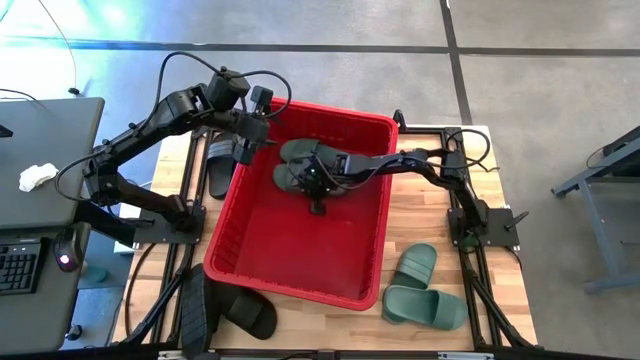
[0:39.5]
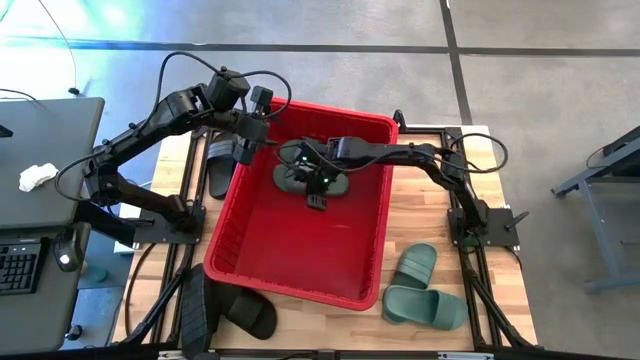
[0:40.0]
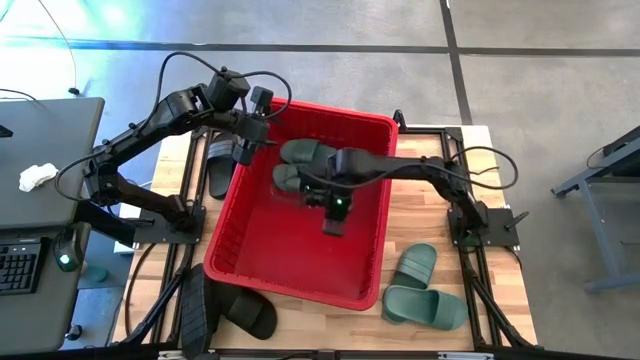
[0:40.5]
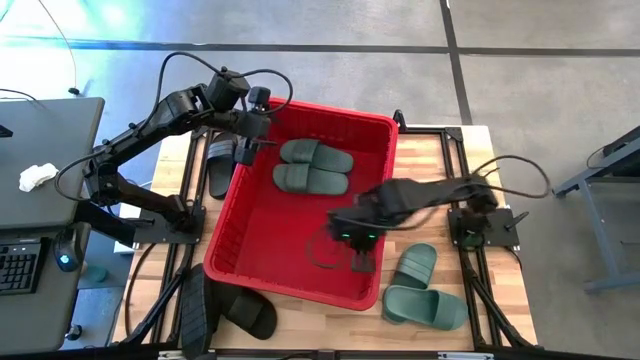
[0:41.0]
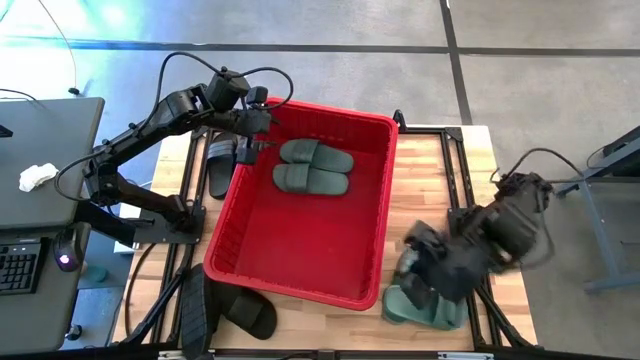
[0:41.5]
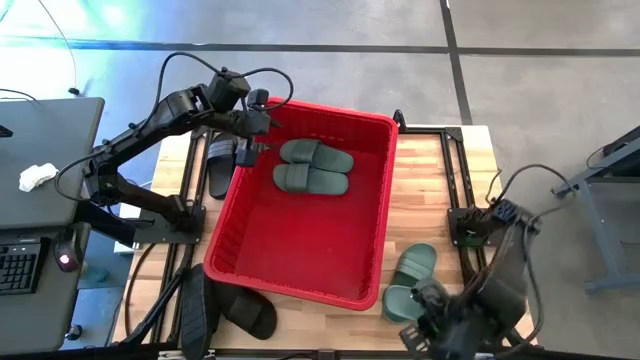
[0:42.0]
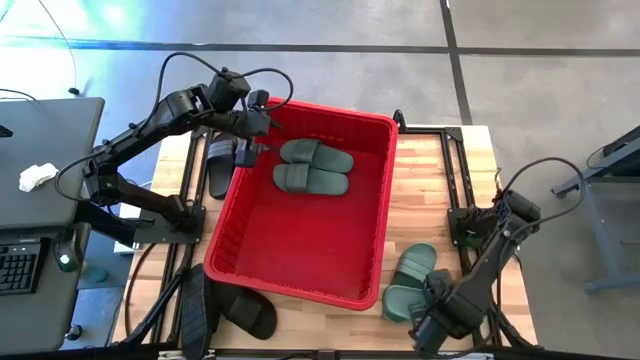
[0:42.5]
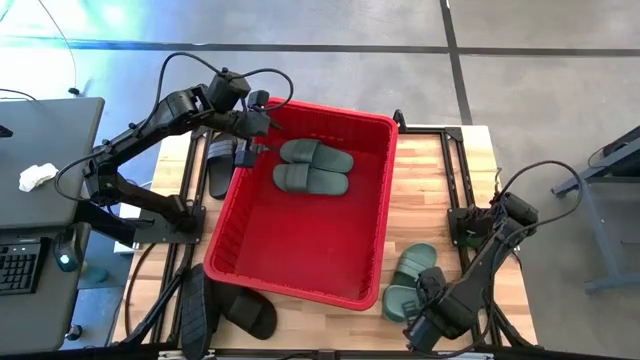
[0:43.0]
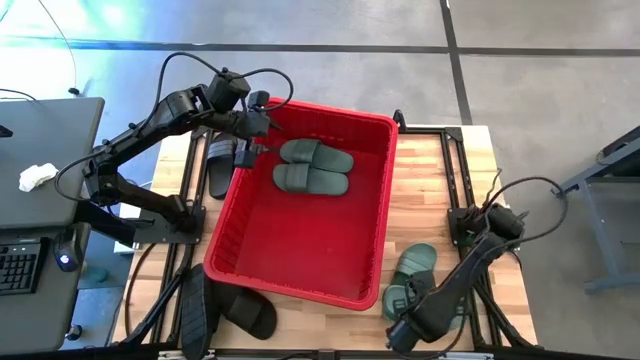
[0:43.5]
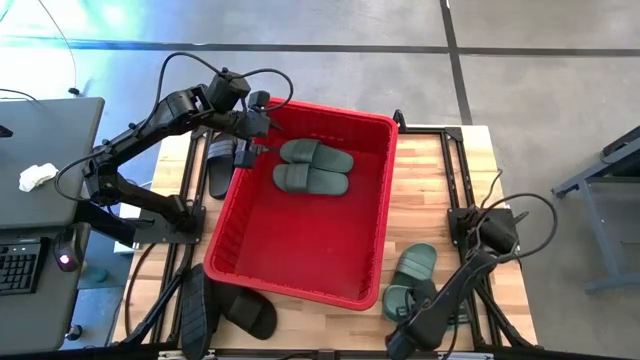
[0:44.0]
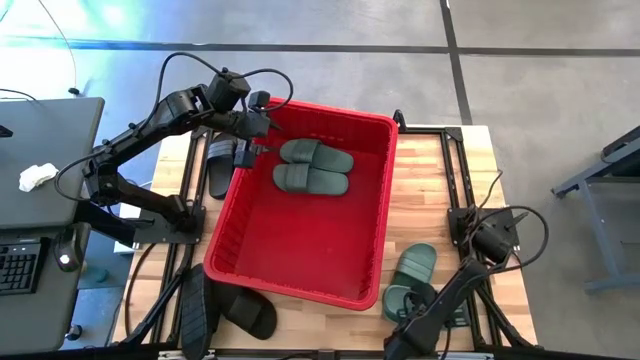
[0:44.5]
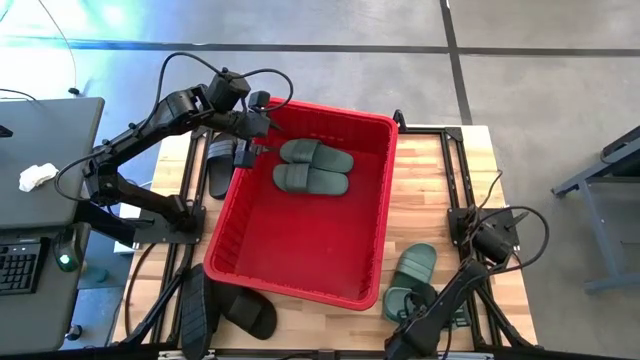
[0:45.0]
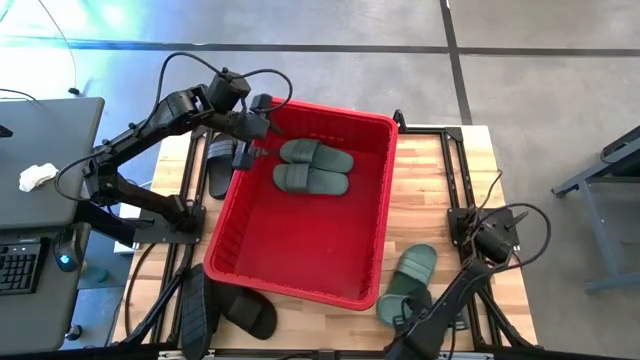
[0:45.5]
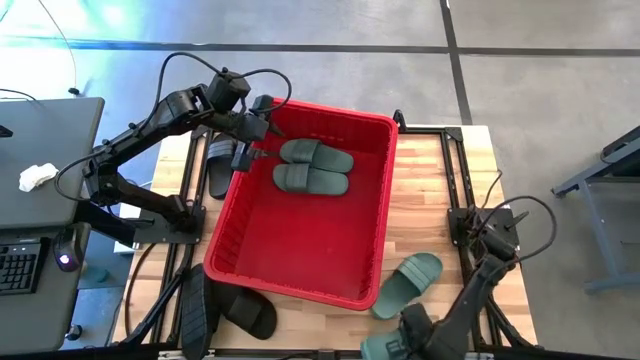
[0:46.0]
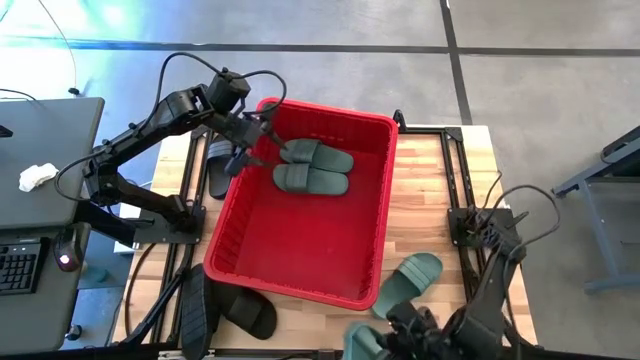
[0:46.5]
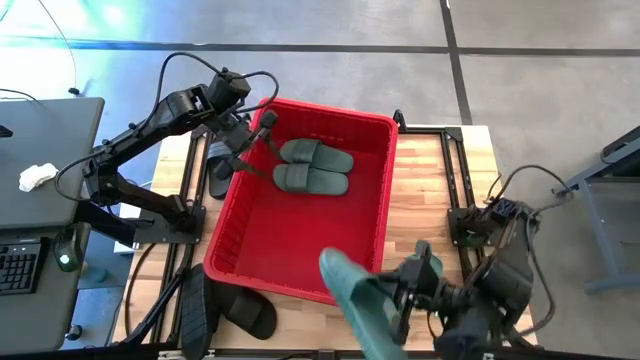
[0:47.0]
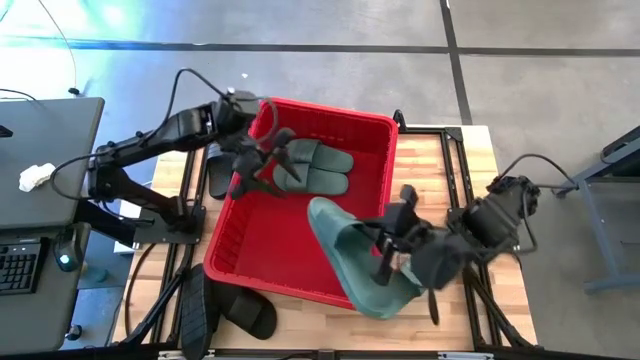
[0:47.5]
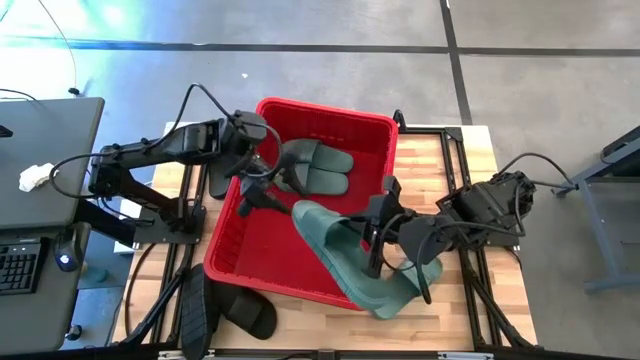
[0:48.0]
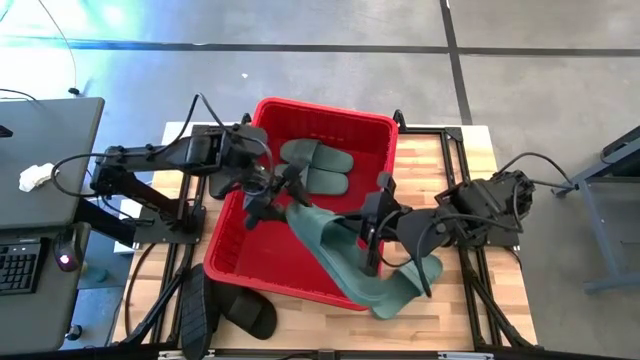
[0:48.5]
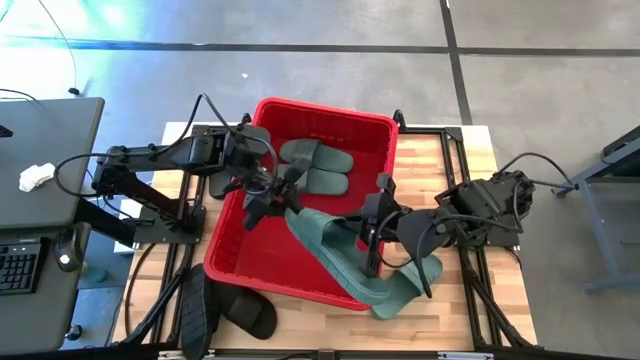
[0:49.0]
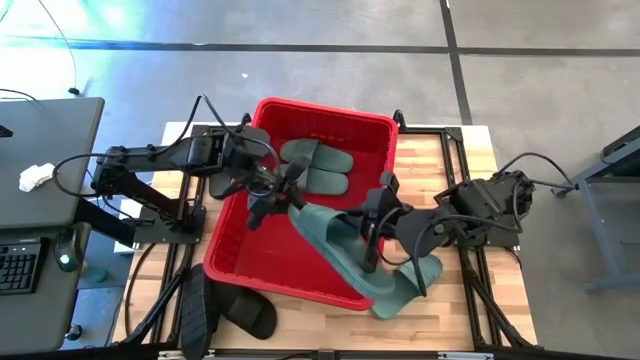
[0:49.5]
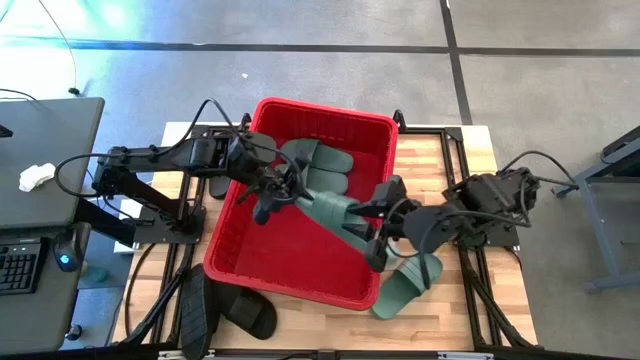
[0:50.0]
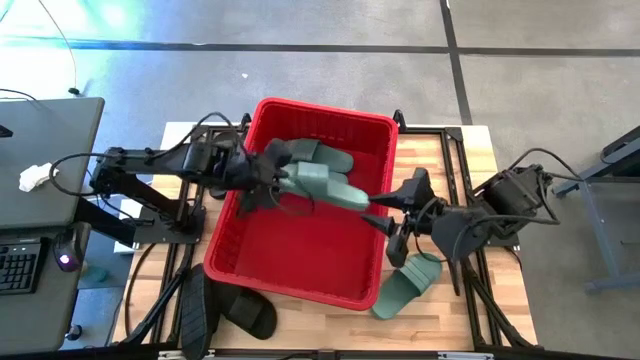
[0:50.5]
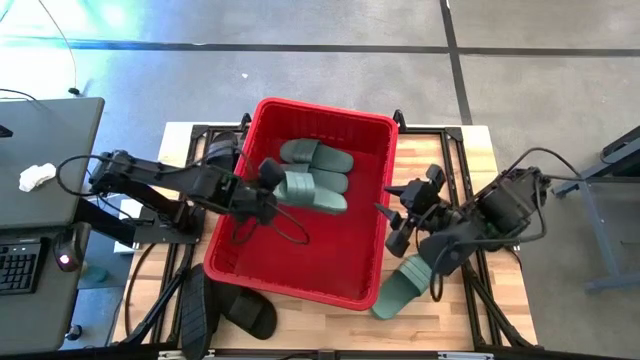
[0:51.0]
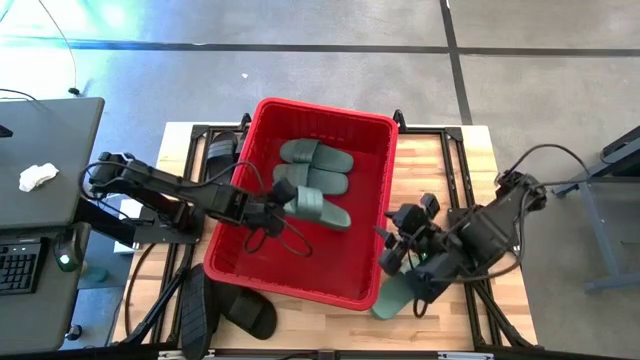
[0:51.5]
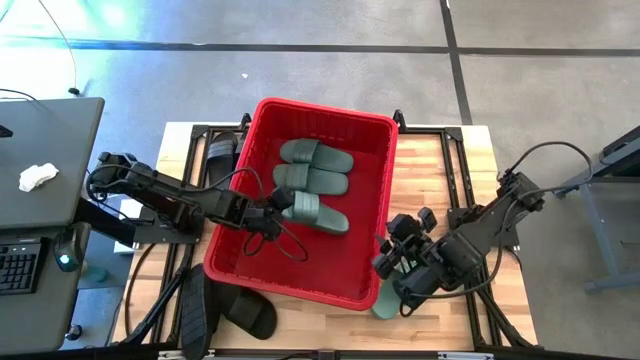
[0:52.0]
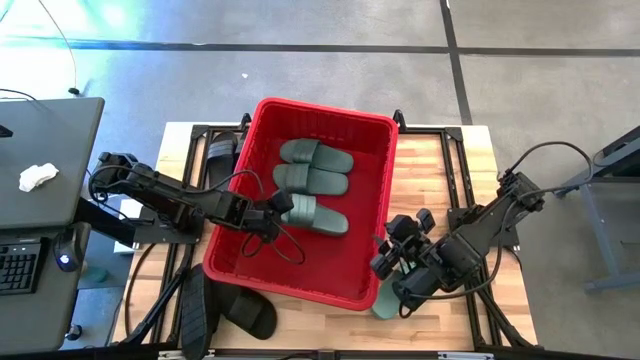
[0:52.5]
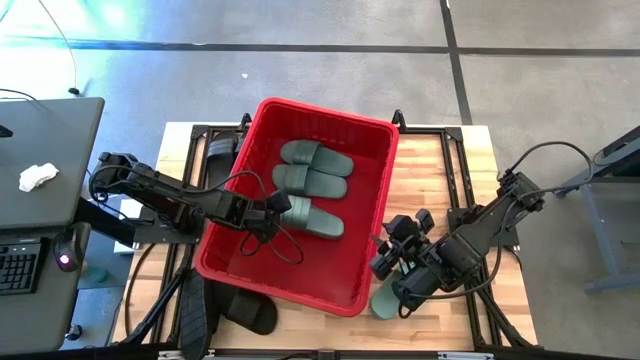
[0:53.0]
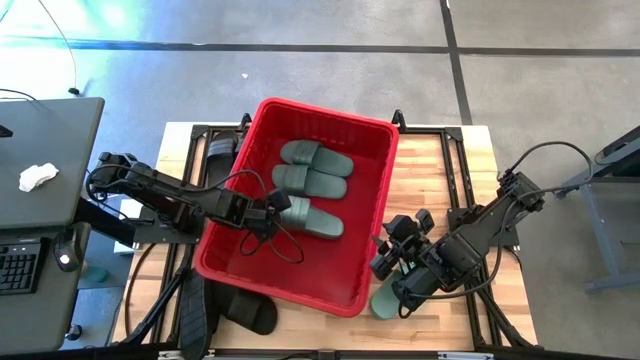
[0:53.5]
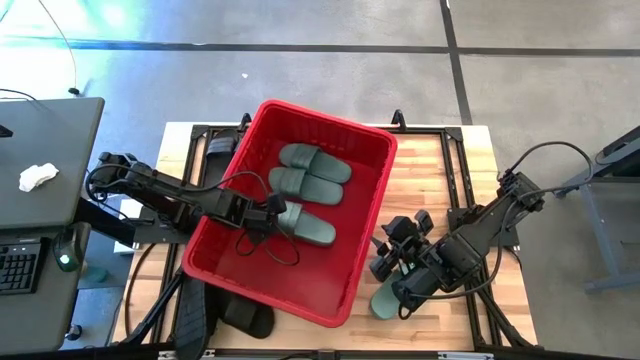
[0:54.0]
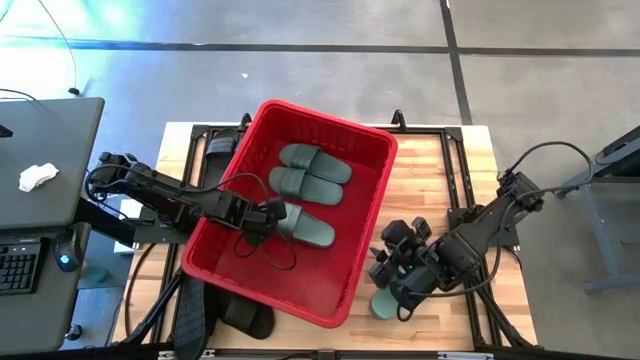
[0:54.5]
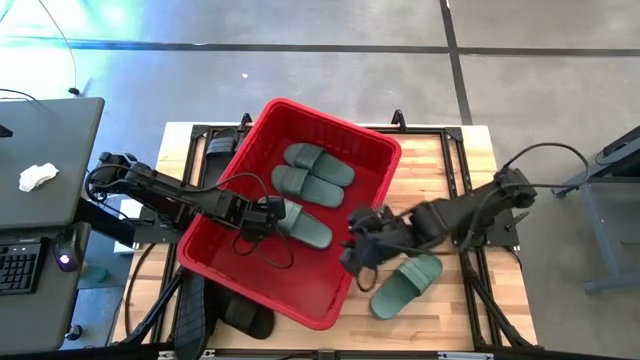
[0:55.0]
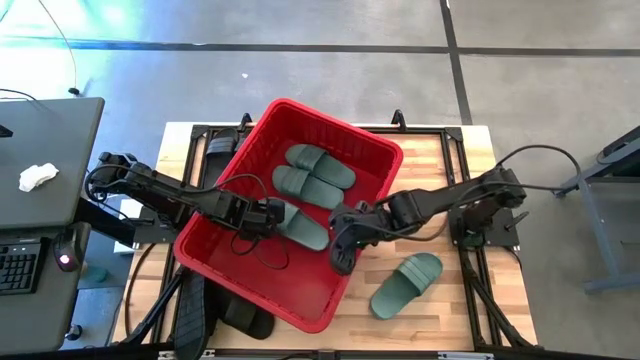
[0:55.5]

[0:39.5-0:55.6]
Task: Pick and place slides into bin
Put the green slide into the red container

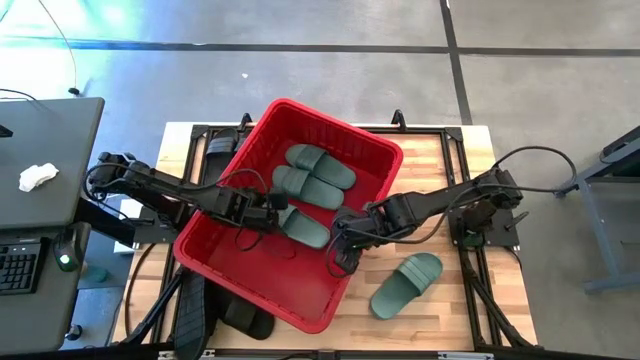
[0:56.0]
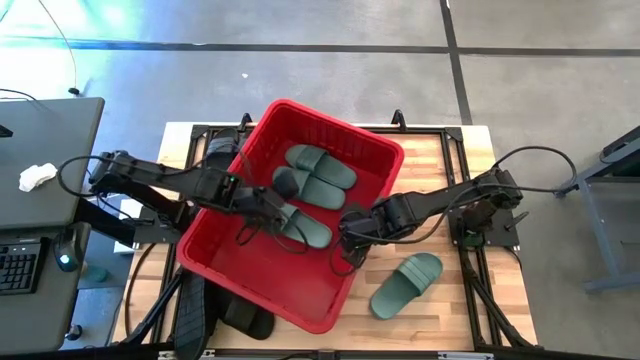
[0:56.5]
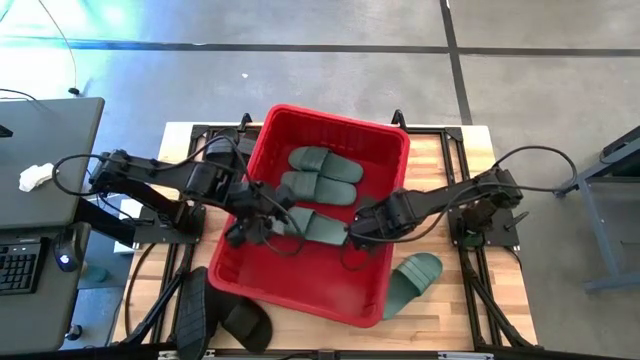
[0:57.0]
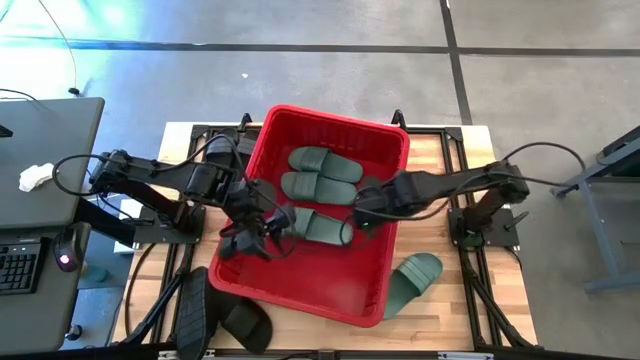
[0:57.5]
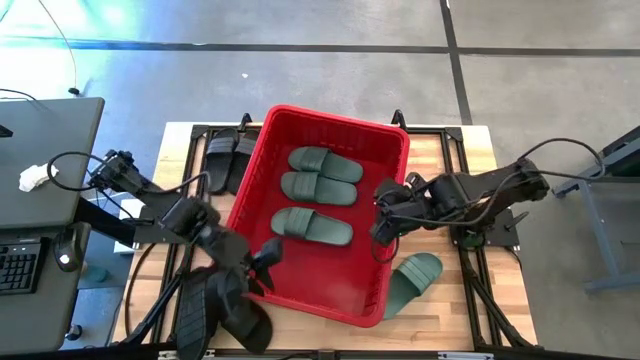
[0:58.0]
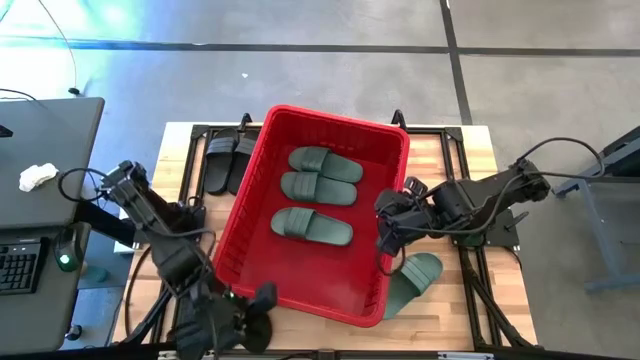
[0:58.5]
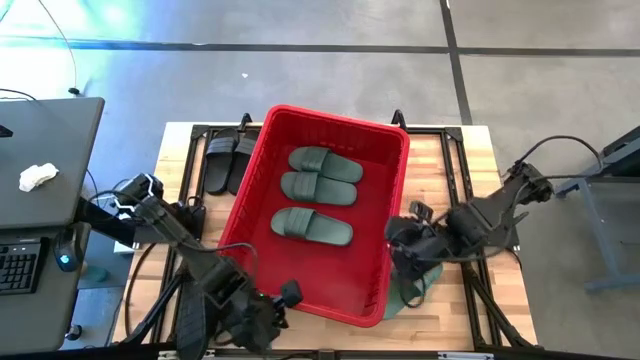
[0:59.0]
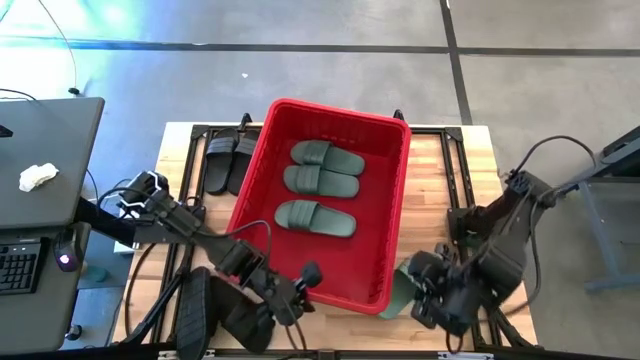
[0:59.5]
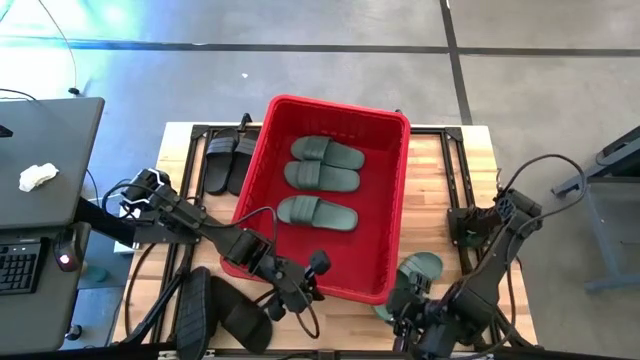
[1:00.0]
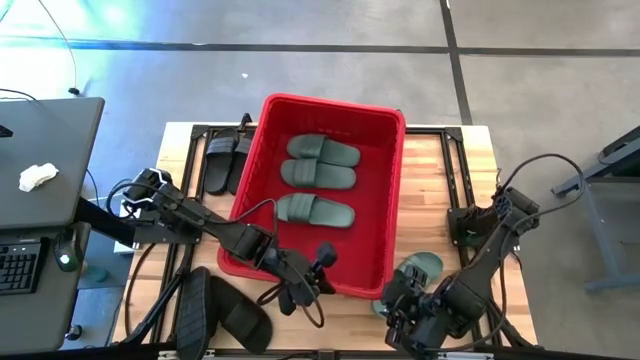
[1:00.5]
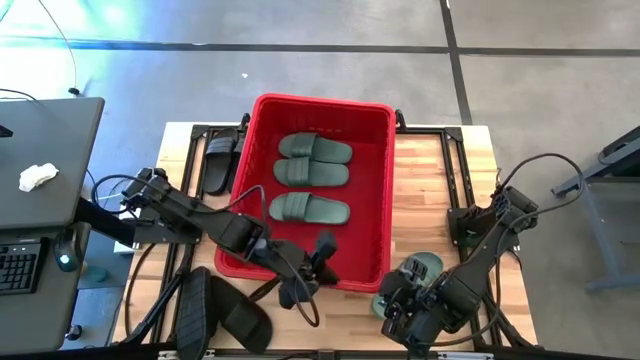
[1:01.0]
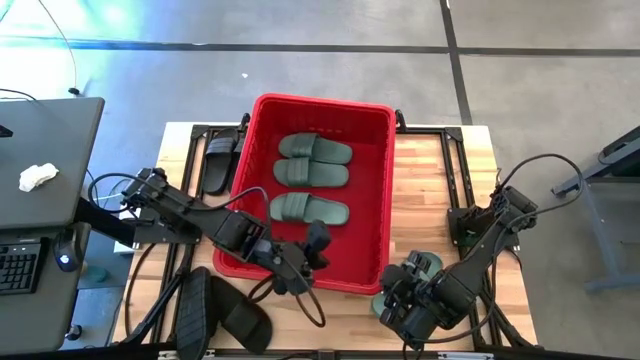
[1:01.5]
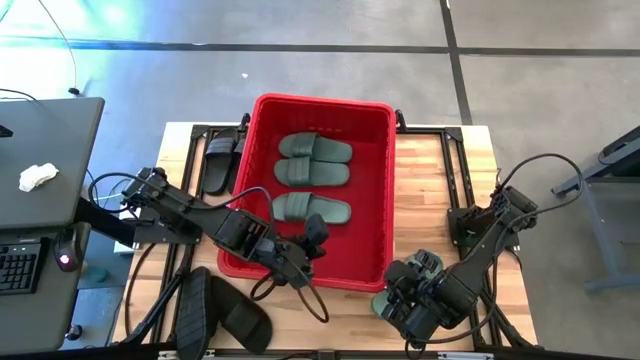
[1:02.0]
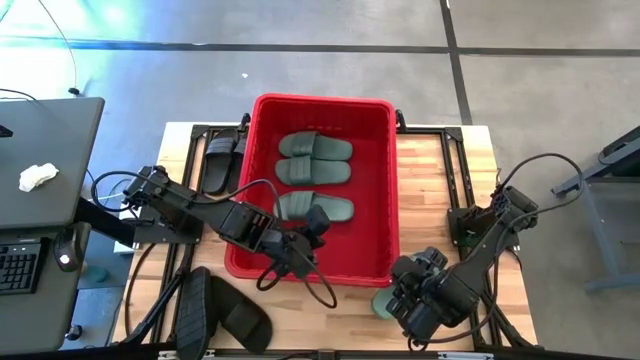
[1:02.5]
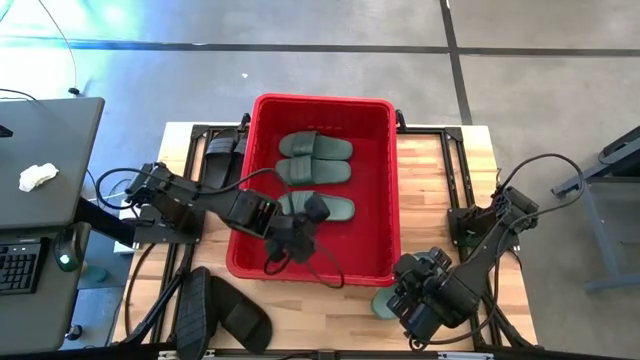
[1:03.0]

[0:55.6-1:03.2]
Adjust the red container on the table
